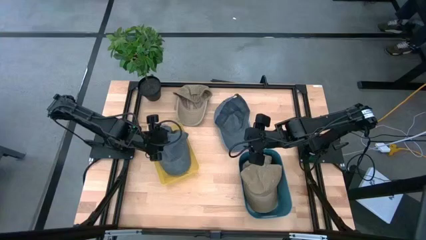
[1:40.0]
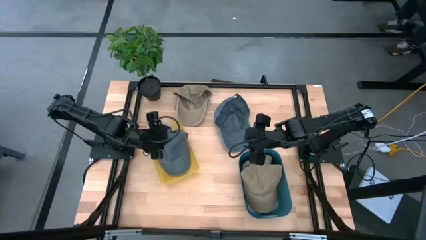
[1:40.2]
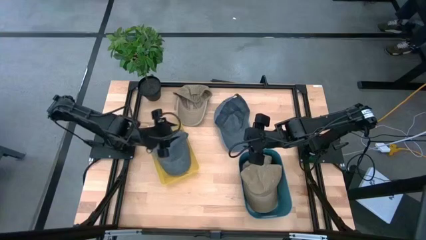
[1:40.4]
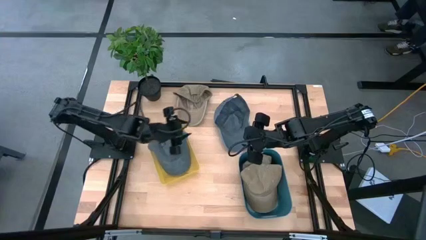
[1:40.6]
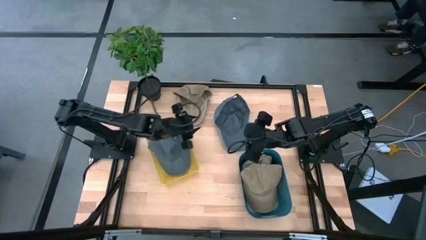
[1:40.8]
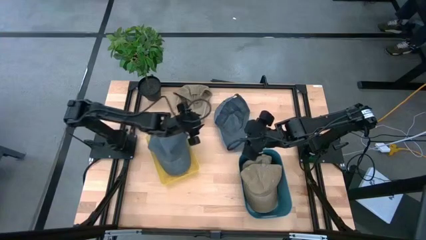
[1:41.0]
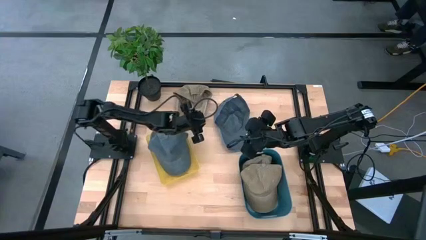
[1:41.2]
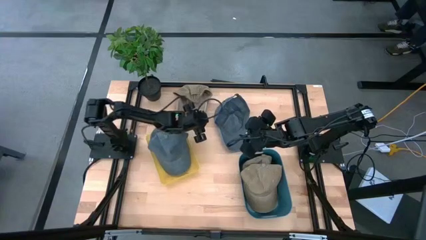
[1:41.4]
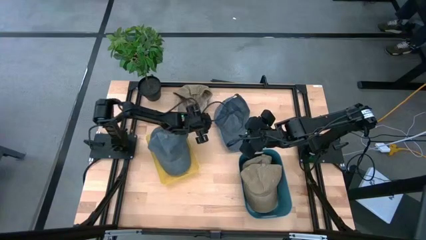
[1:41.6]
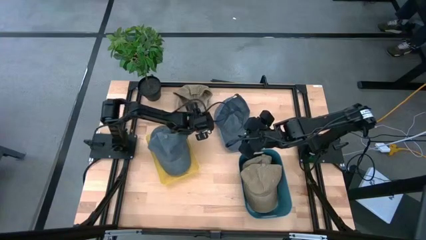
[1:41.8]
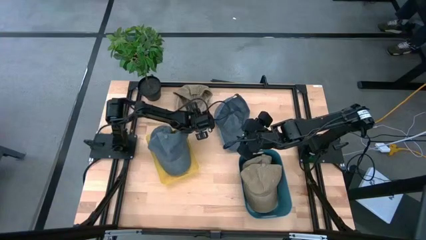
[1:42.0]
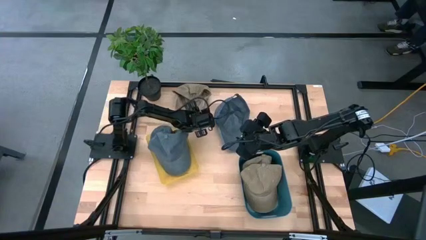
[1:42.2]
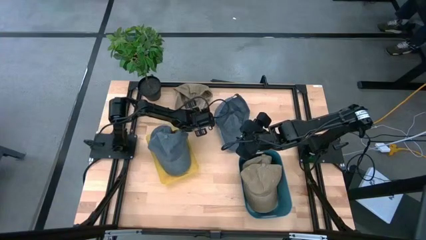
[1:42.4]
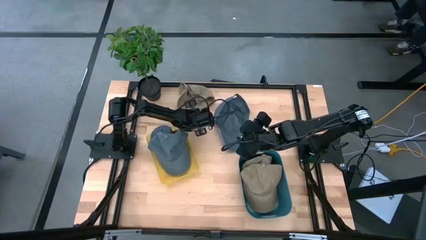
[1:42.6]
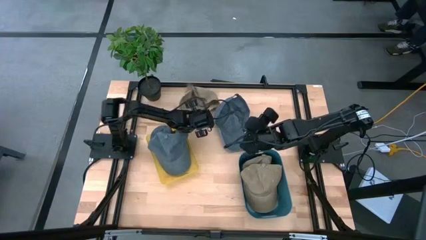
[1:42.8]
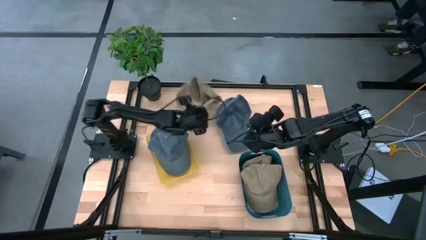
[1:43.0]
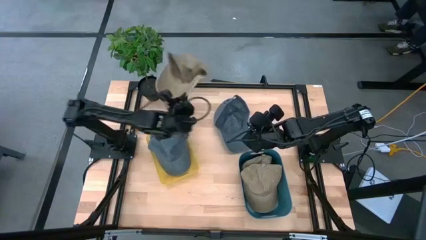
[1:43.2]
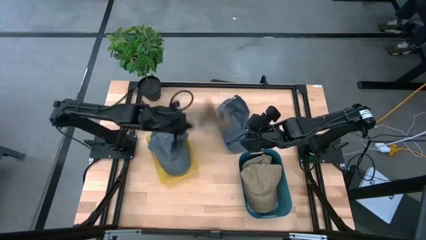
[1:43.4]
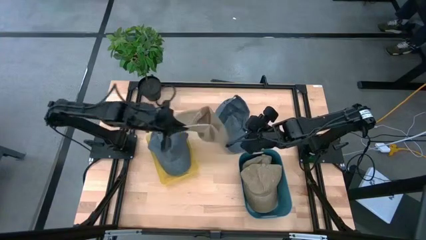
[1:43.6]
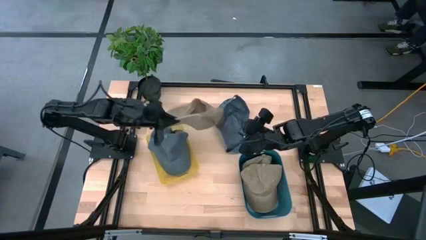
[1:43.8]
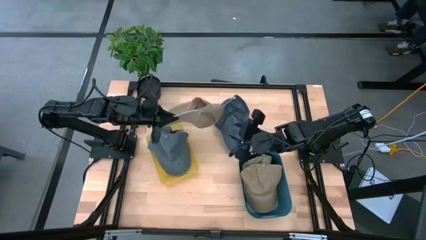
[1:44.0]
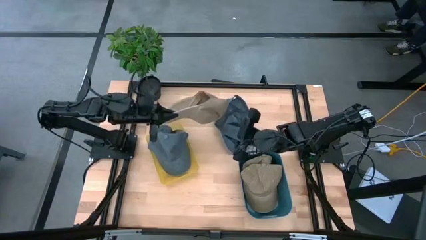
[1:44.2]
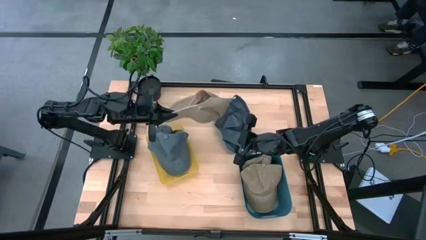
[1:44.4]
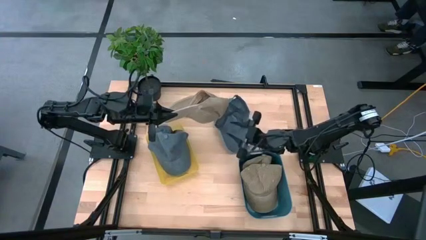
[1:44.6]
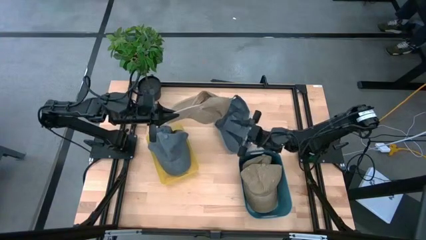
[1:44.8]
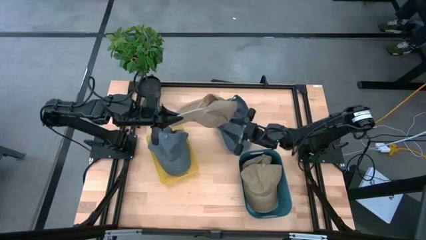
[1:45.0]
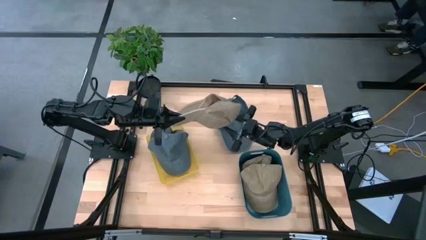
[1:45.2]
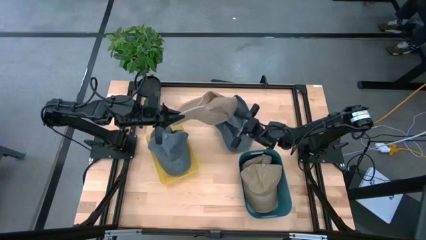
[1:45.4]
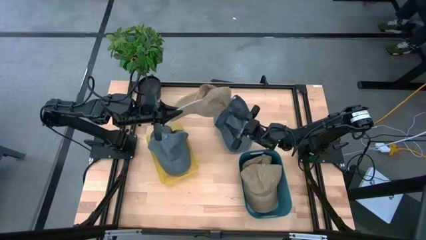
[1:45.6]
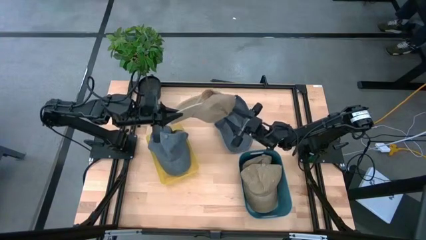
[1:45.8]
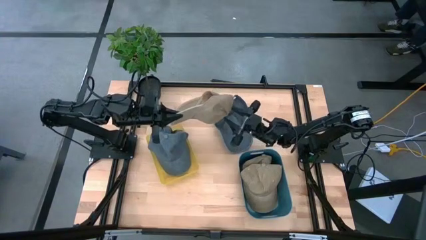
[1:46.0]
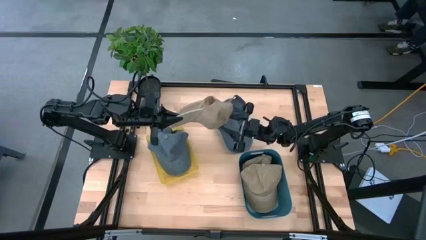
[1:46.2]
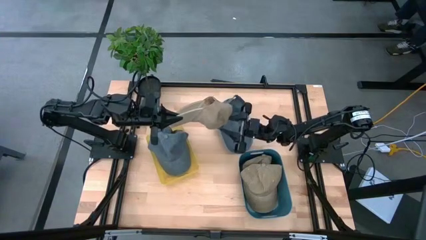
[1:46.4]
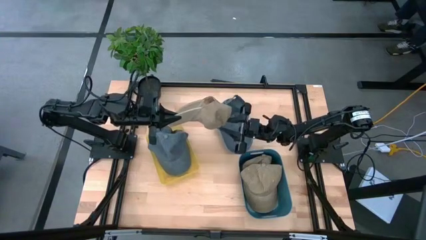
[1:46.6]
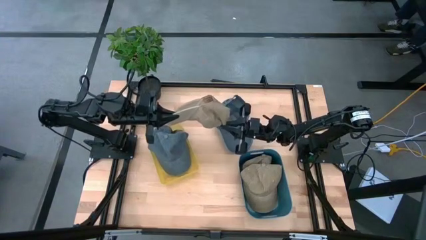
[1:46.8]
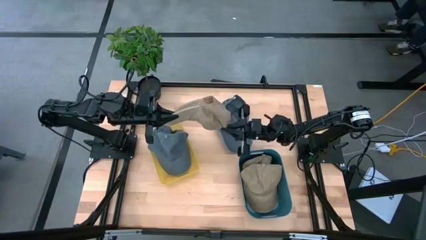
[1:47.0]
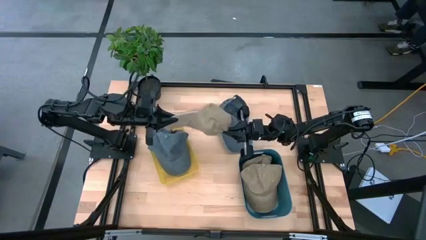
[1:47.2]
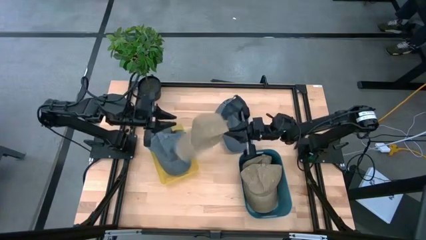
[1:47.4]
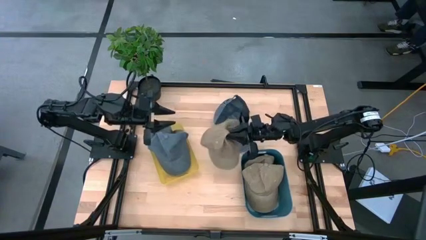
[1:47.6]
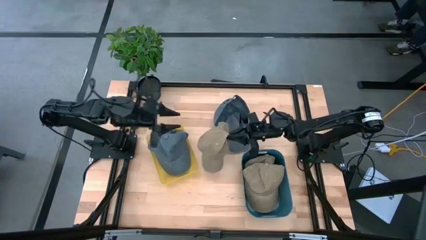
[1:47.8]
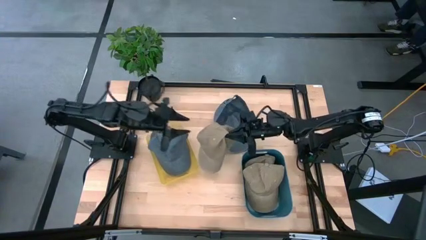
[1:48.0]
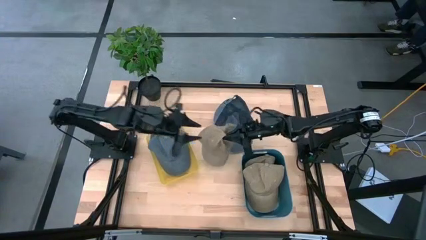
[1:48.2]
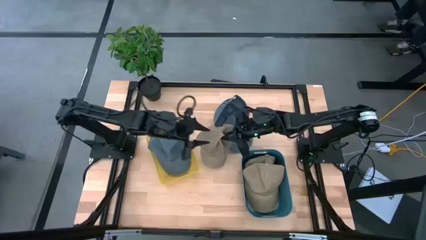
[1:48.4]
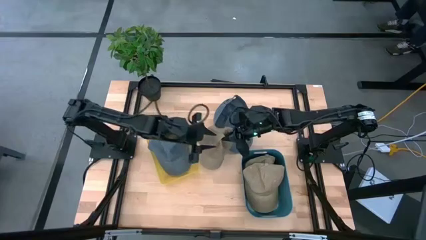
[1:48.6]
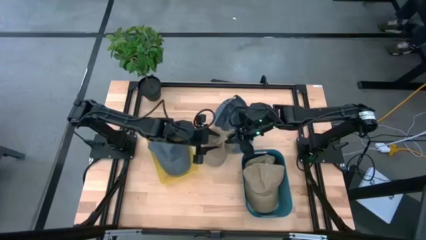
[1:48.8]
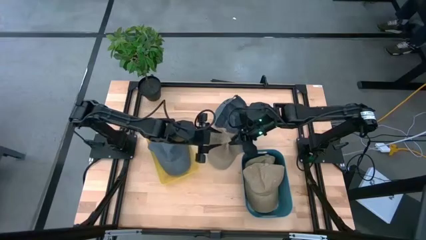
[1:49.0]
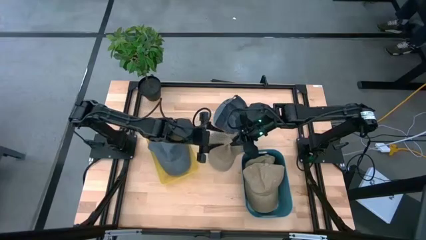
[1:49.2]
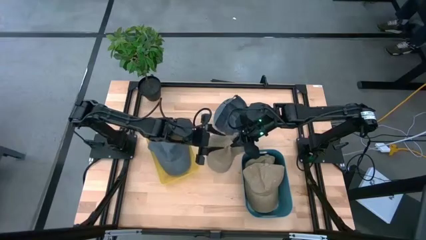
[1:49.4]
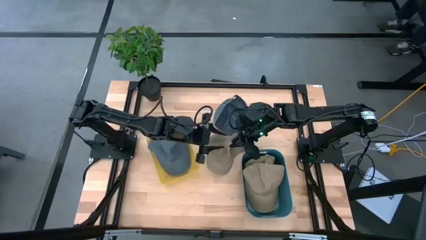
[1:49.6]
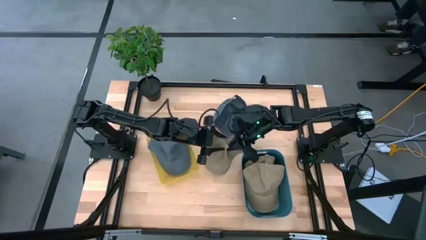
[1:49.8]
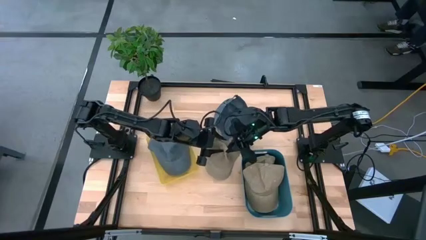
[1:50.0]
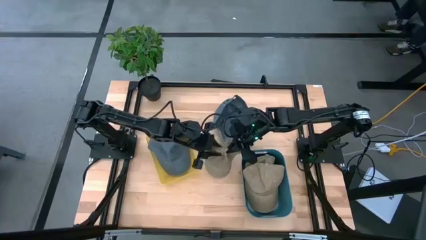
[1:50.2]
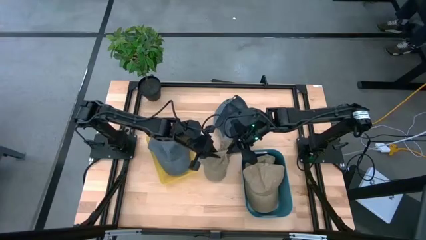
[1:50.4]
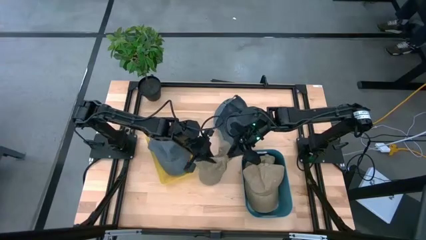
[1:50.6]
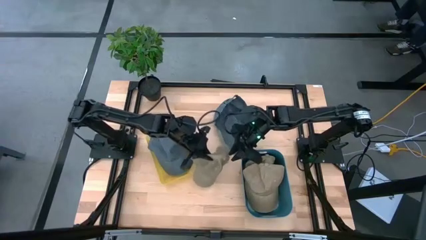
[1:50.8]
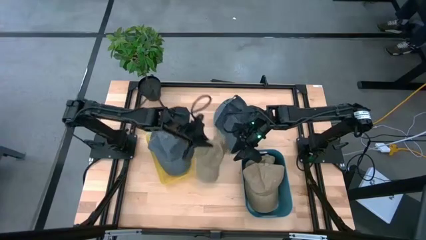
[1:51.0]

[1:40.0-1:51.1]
Task: Pick & Place hat
Put the brown cap into the yellow bin

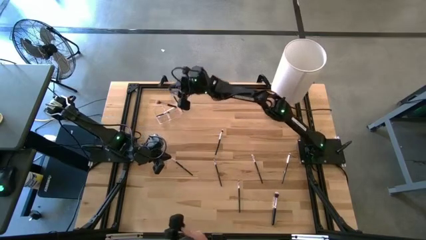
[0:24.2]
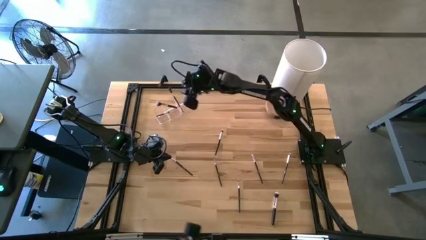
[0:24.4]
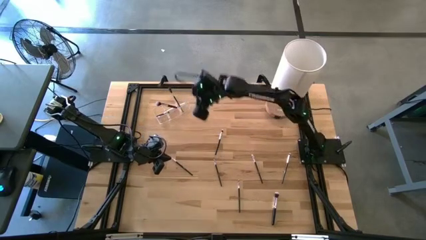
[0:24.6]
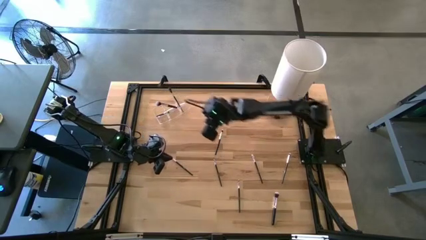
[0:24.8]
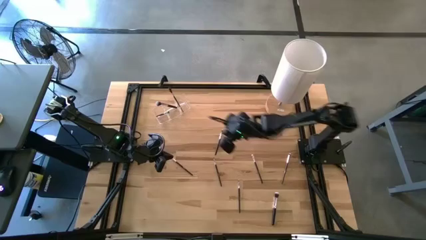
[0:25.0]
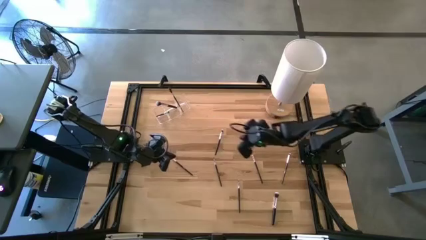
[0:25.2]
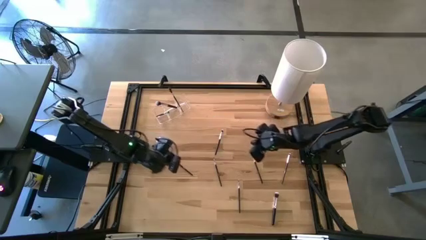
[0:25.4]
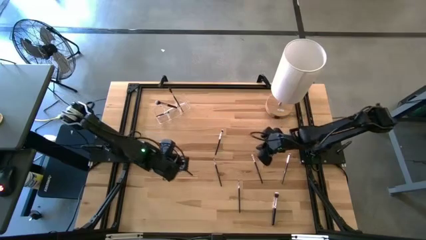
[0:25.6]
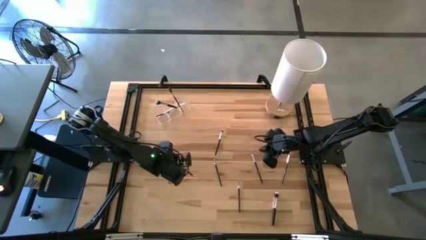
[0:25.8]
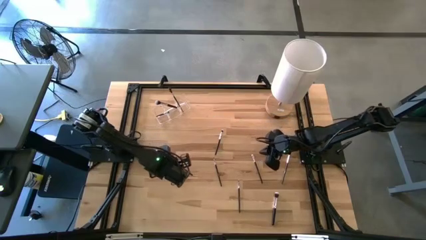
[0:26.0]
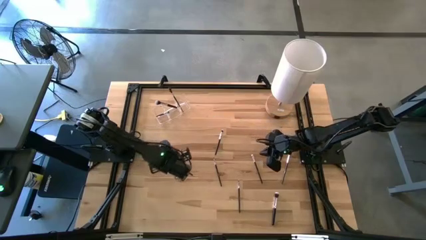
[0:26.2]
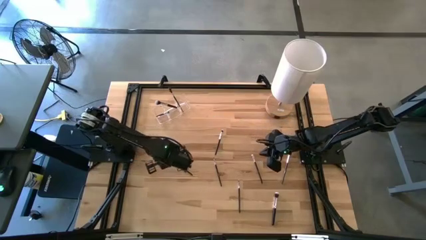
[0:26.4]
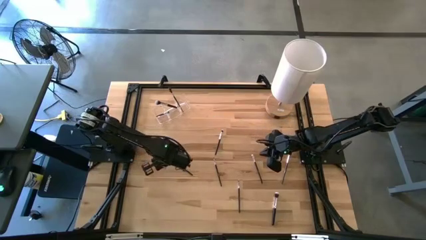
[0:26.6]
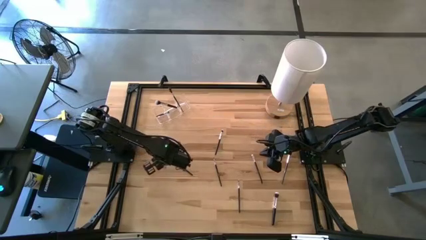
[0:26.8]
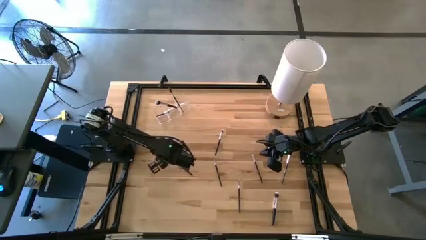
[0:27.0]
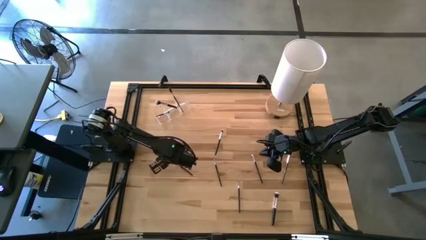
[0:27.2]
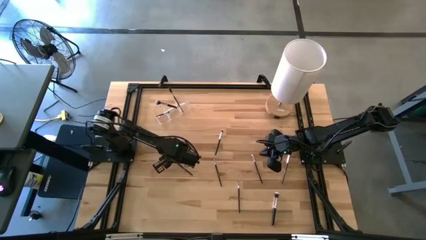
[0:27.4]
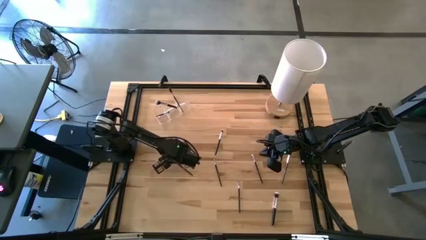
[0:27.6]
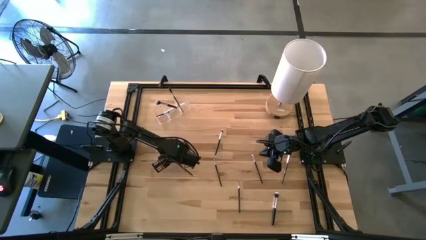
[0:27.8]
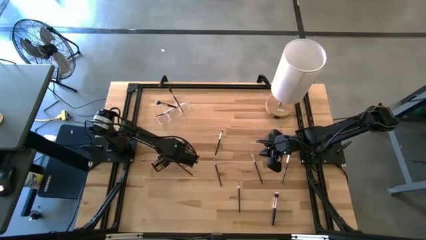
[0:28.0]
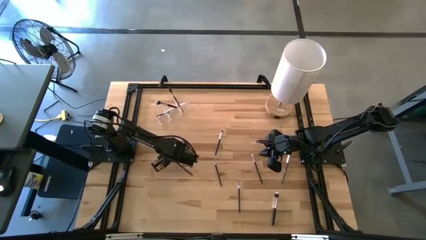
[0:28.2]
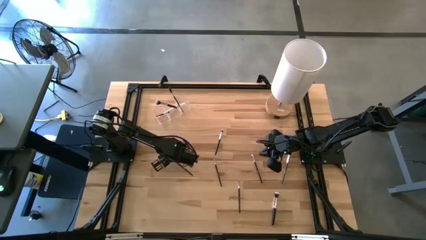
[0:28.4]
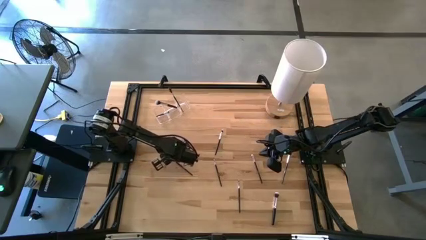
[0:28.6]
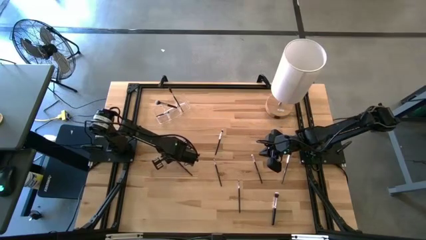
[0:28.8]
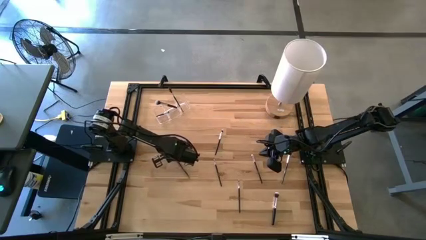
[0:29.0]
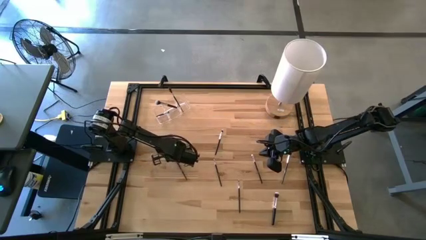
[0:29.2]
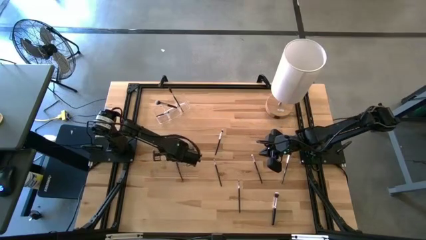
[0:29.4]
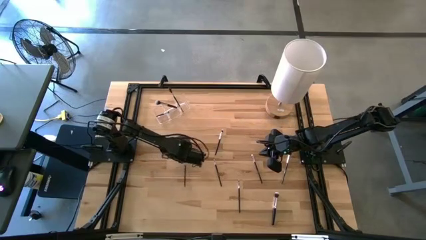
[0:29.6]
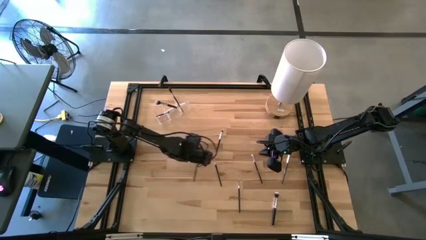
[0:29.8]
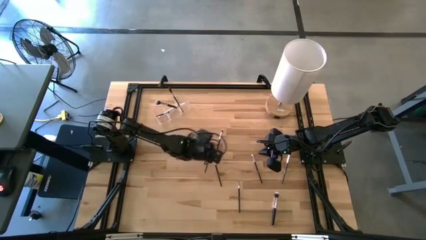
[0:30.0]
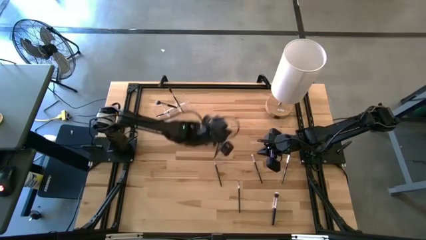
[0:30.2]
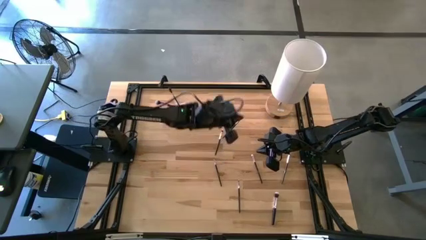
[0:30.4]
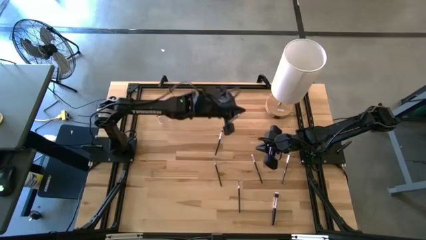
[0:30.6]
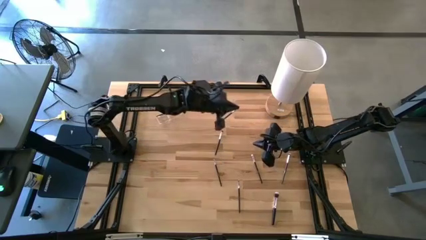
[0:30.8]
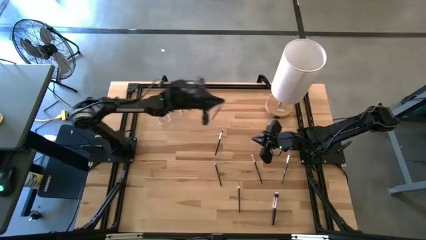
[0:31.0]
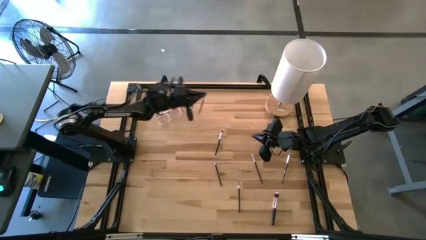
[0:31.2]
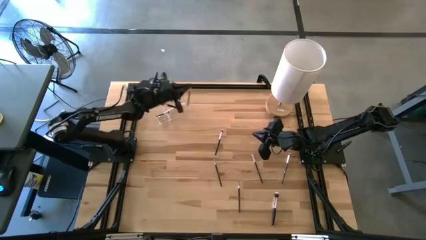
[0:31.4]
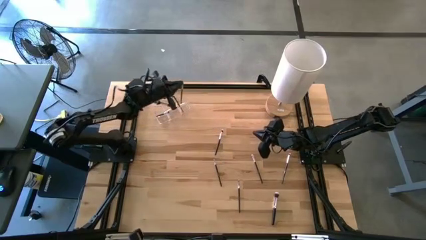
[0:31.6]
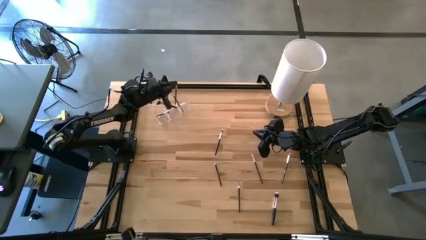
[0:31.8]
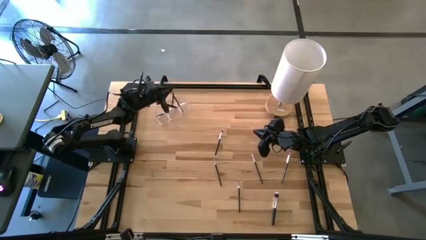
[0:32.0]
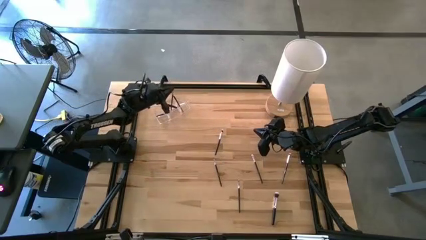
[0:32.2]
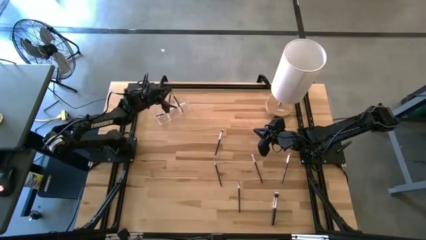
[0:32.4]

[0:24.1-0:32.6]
Task: Put items in baskets/containers
Put the eyeshadow brush into the transparent organizer
